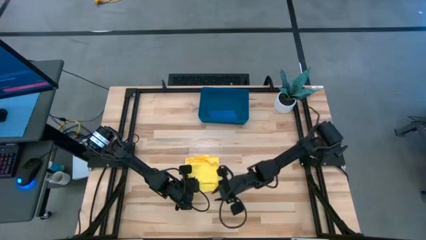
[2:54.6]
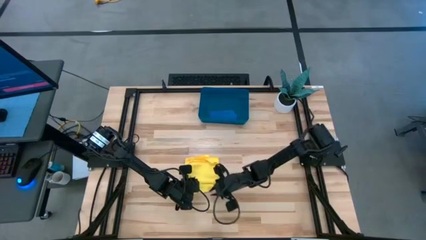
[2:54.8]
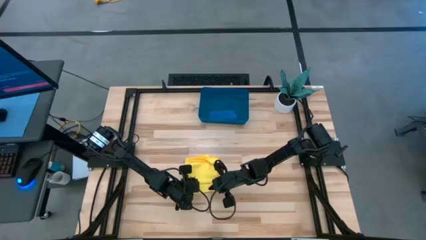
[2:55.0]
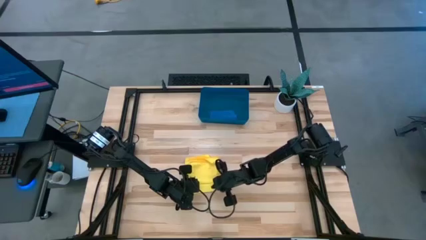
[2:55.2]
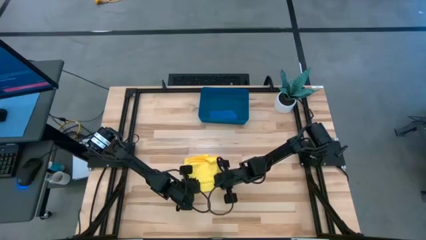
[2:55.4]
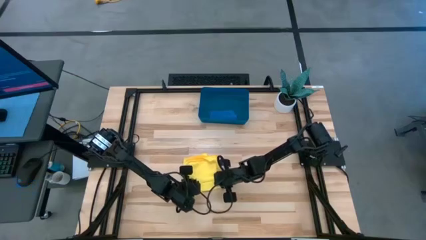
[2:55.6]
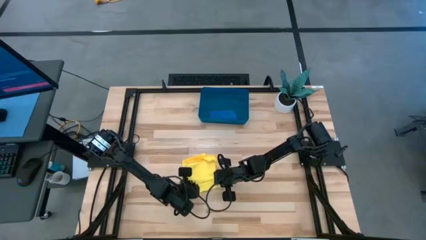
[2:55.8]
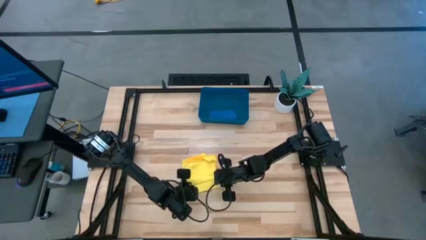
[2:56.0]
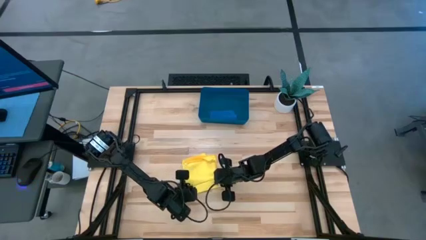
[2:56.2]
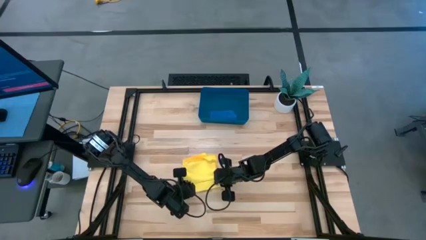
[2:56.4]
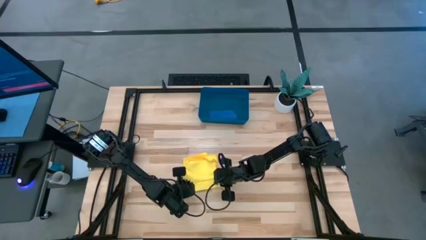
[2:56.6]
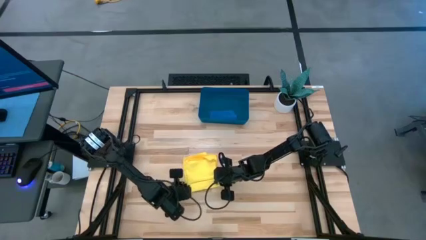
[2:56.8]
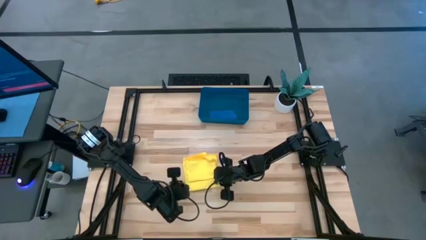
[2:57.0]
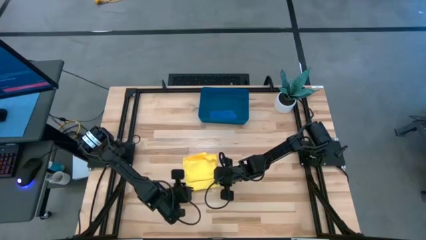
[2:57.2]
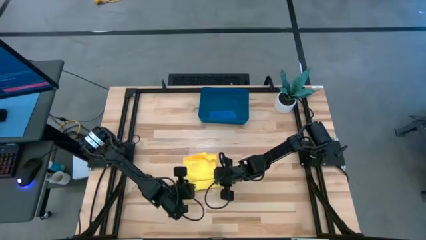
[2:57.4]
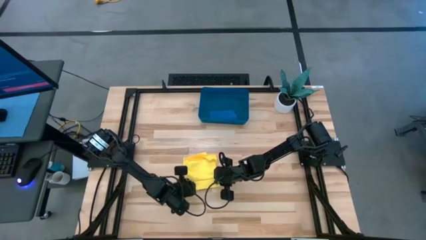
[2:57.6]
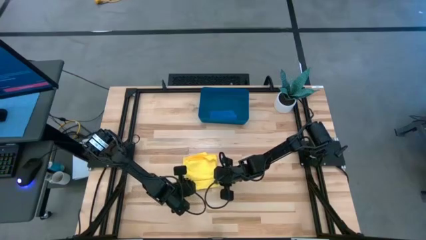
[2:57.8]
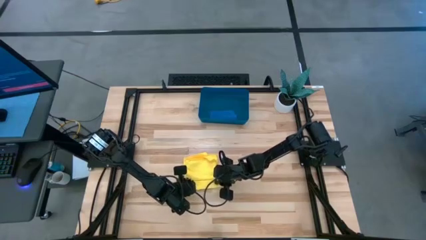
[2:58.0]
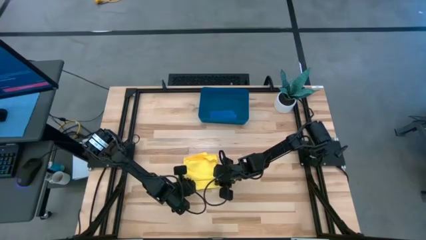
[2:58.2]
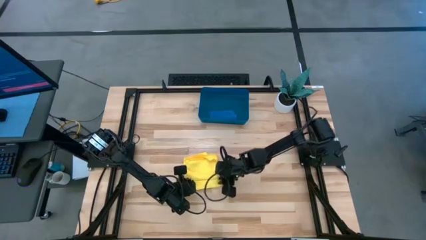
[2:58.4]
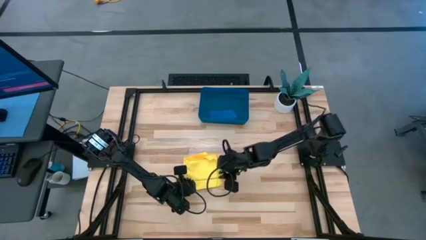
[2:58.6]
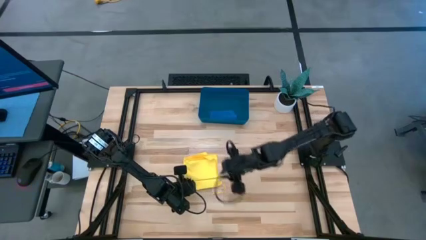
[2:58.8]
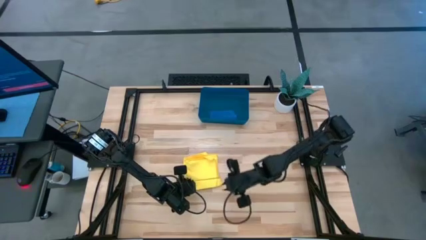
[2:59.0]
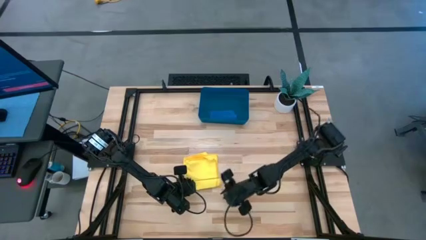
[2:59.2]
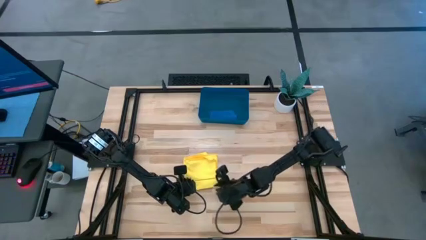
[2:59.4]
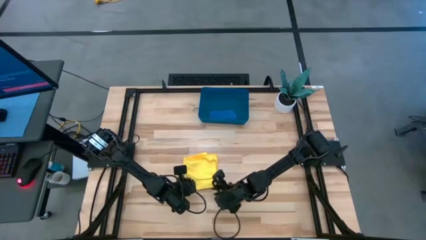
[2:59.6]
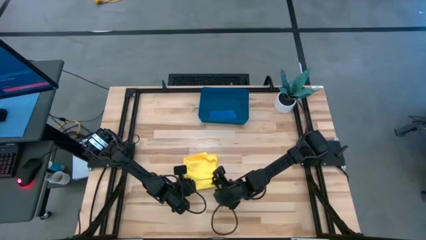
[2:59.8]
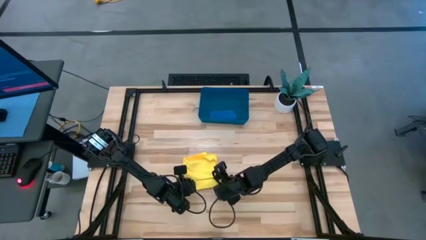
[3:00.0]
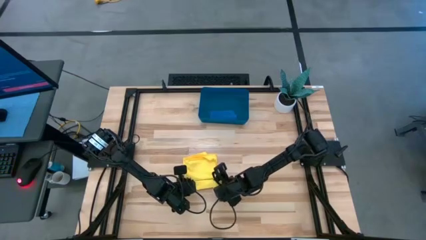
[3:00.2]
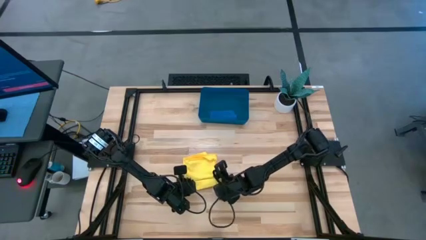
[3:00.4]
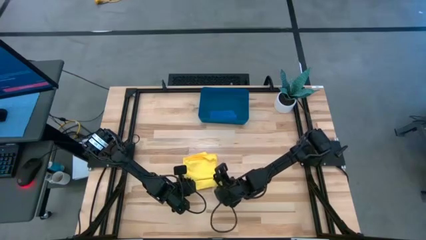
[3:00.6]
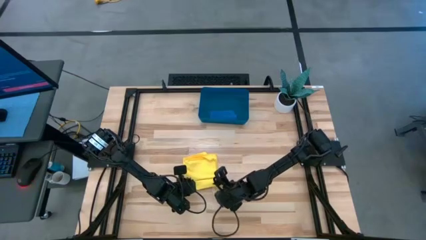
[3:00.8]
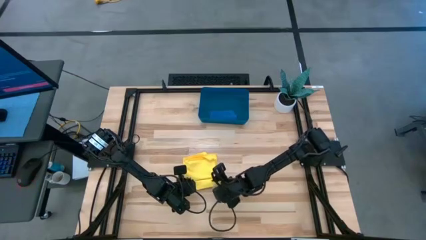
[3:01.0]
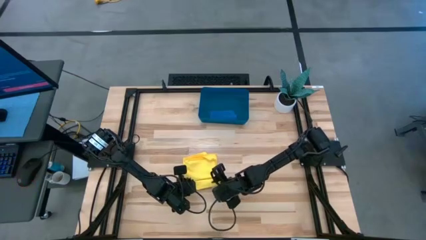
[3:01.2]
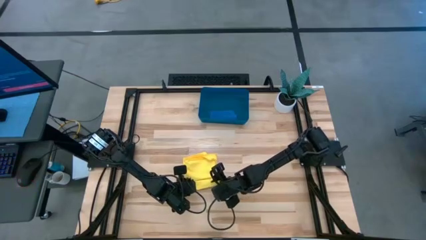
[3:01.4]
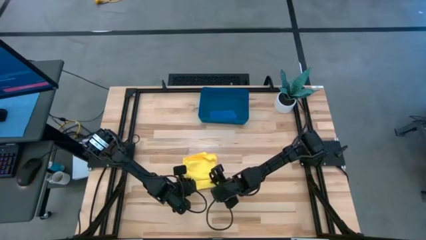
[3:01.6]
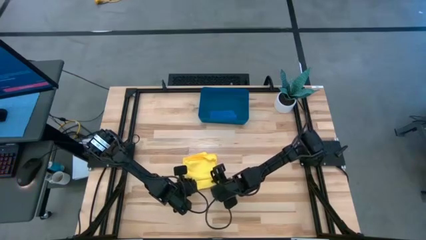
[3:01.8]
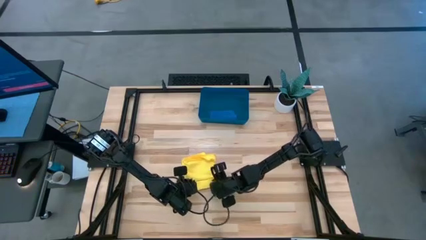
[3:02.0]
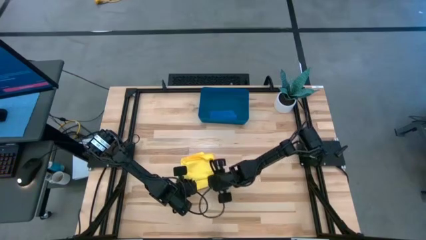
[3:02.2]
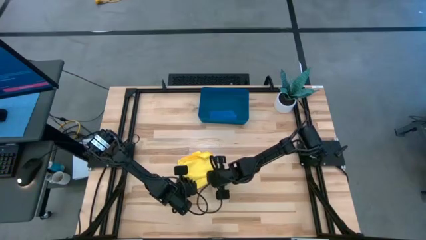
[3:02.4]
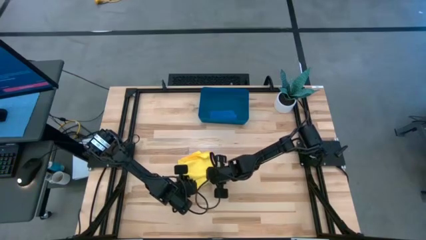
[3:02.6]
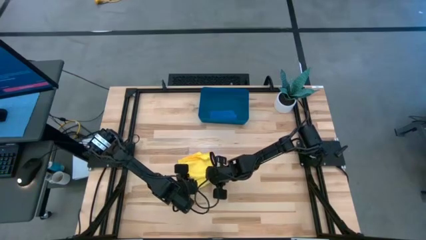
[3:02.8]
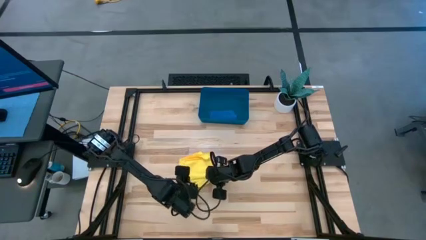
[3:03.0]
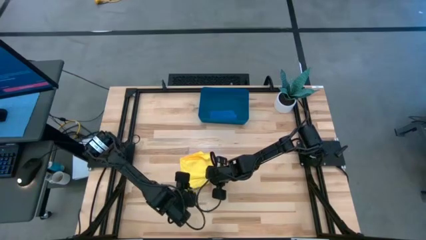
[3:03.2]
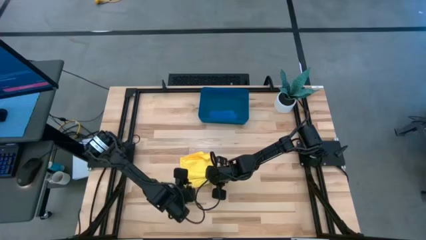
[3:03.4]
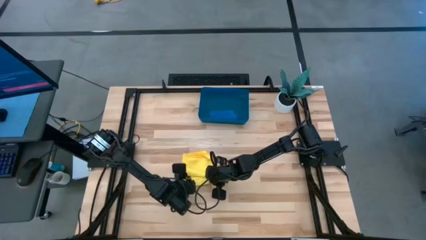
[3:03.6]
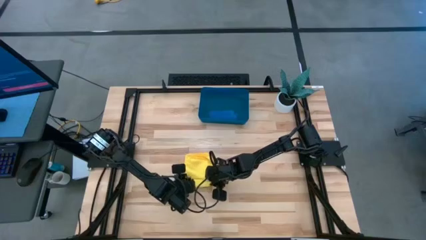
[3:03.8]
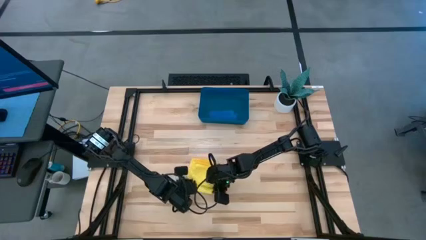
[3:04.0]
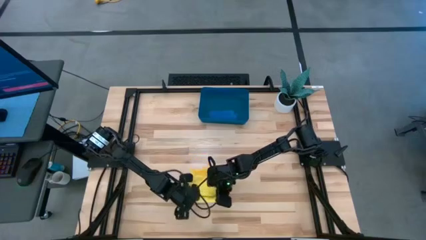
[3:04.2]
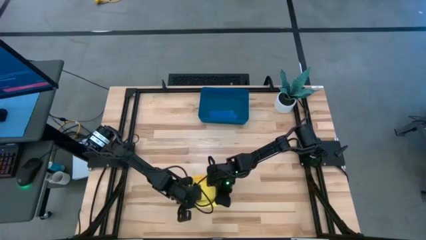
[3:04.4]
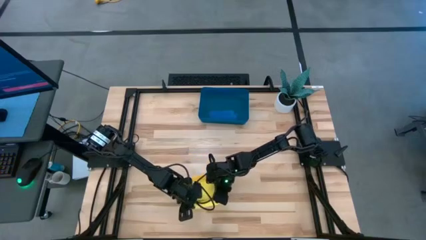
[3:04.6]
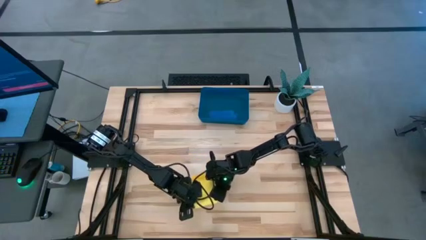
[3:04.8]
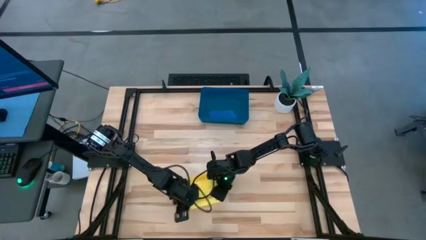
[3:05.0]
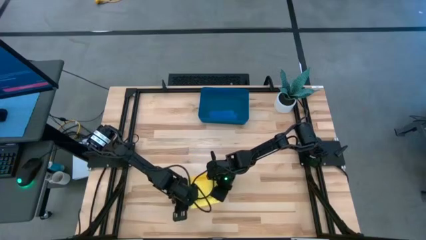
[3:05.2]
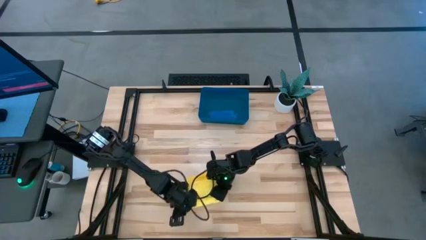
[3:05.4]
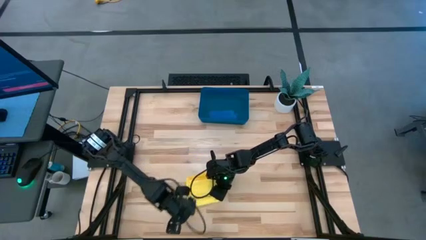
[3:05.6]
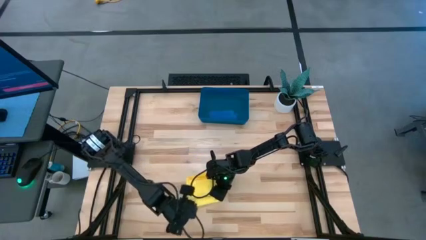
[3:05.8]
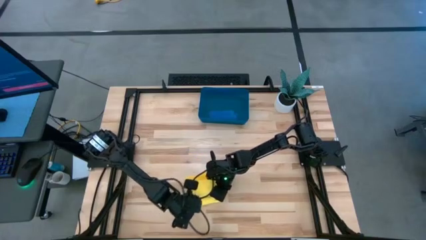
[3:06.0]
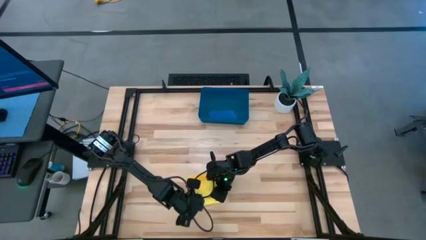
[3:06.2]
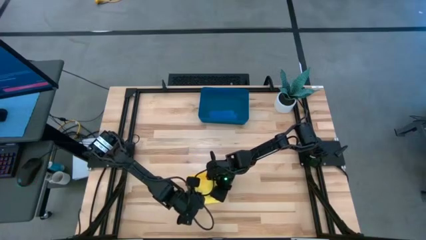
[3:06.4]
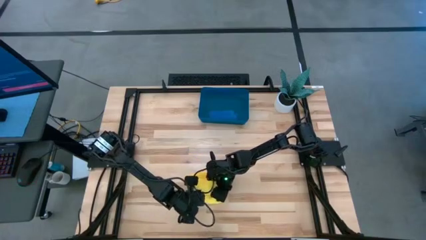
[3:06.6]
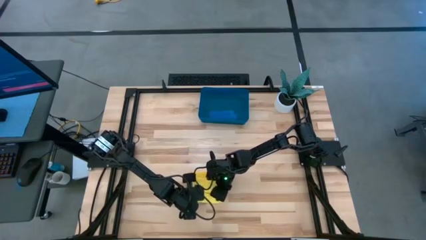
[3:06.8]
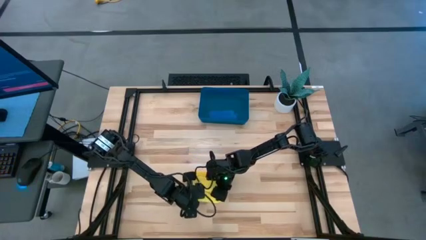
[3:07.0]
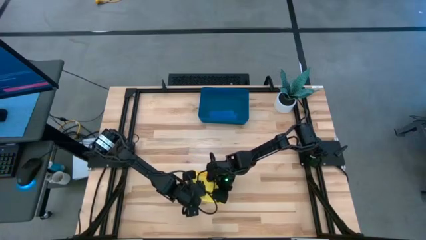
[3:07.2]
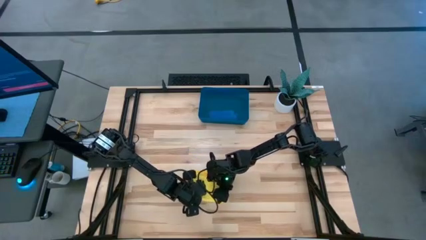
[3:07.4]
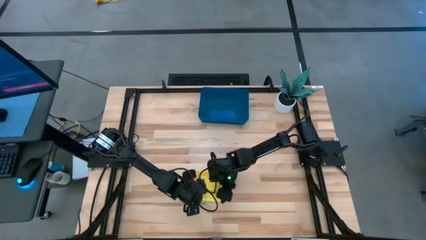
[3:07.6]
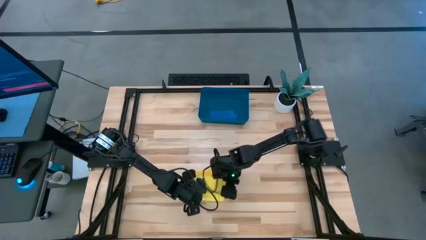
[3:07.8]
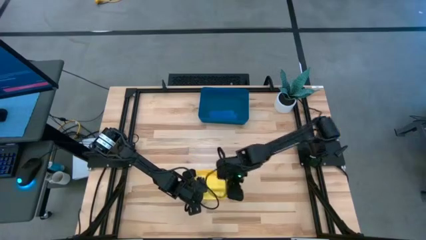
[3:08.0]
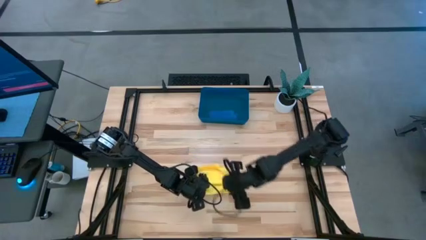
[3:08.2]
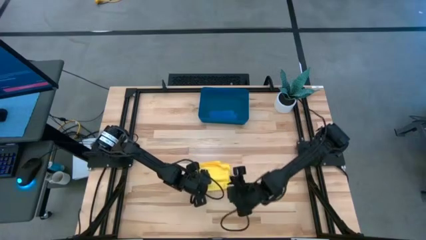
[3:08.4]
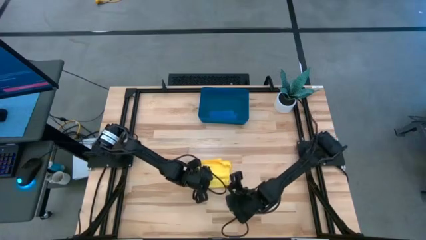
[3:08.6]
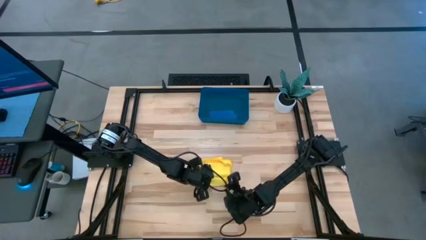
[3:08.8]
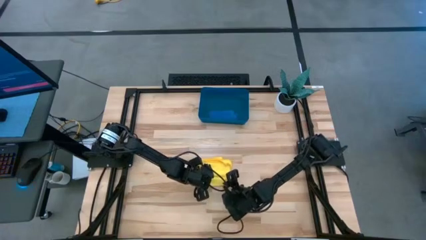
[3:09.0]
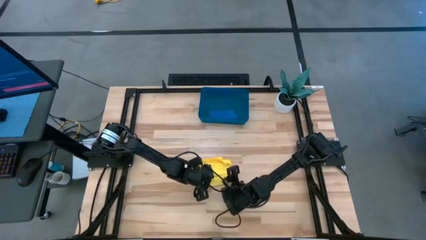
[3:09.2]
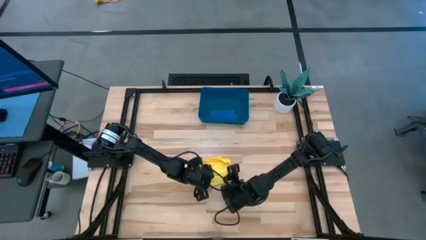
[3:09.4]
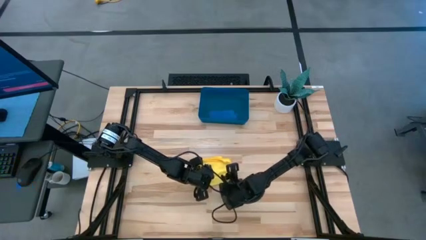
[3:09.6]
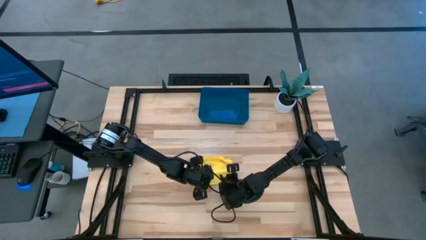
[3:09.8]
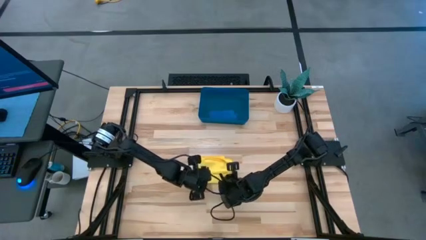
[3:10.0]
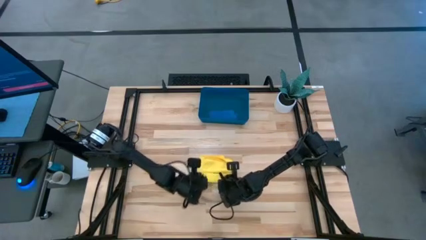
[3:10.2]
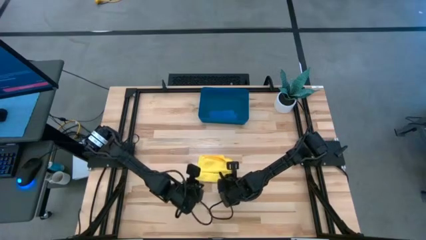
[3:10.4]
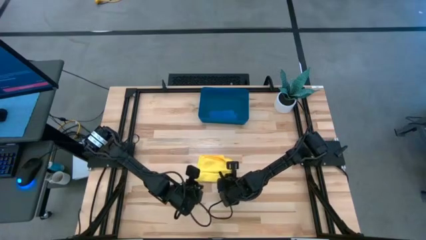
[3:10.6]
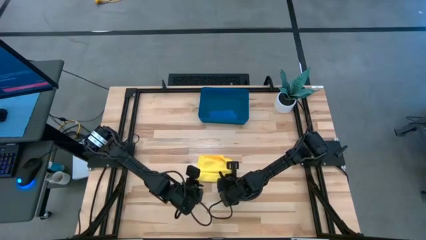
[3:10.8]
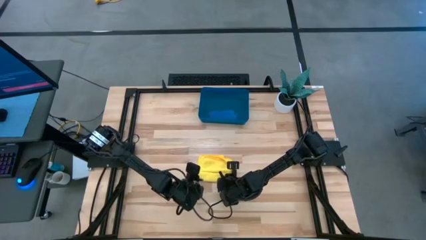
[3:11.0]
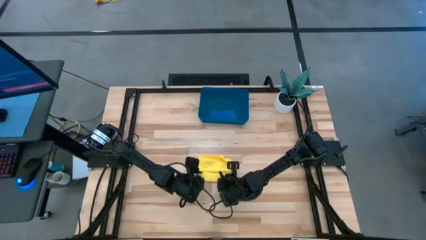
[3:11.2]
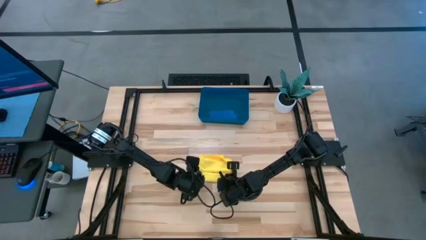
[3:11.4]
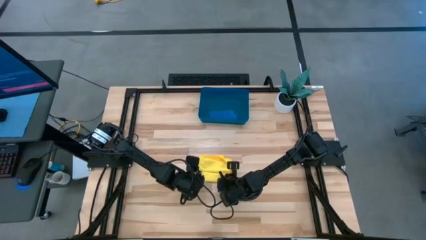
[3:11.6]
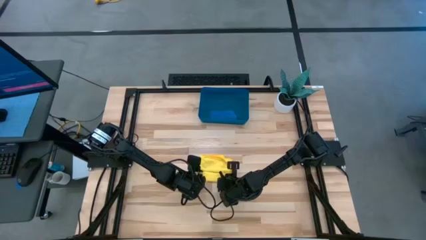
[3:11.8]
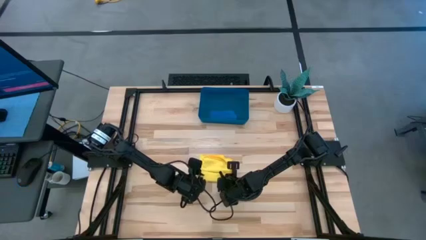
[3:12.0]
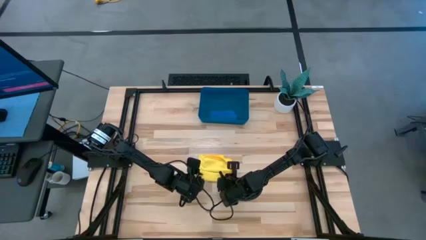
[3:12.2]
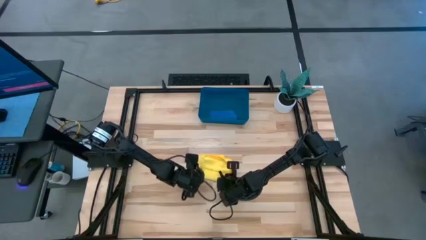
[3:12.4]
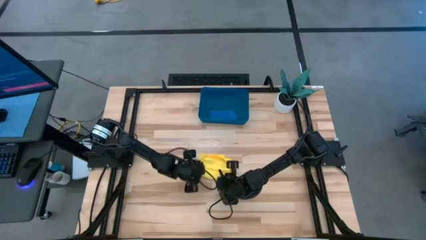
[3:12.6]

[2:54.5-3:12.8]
Task: Roll microfiber towels into tight, uniform cylinder then place into a basket
Roll the yellow microfiber cloth
